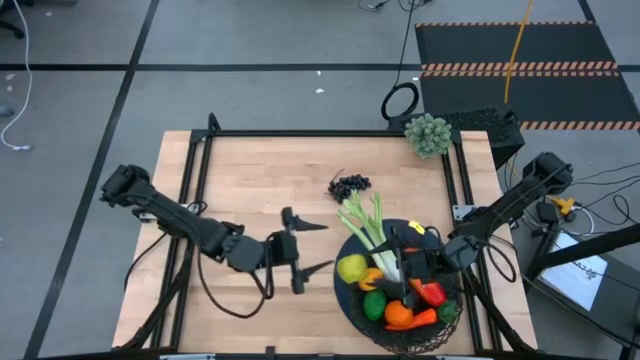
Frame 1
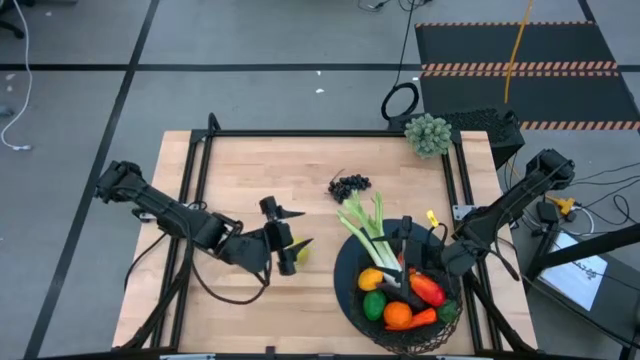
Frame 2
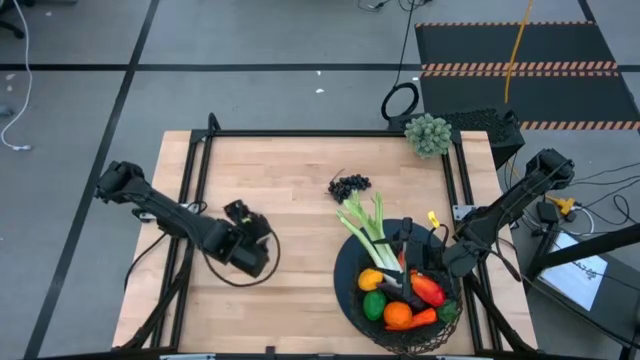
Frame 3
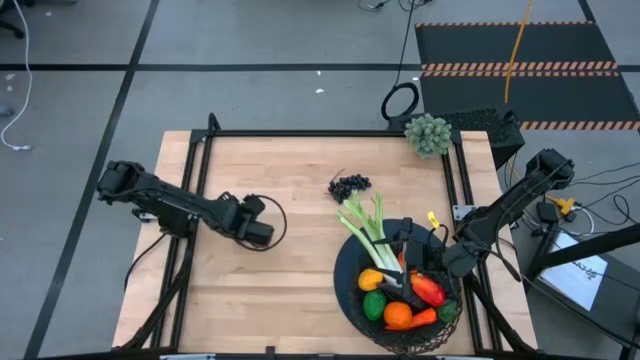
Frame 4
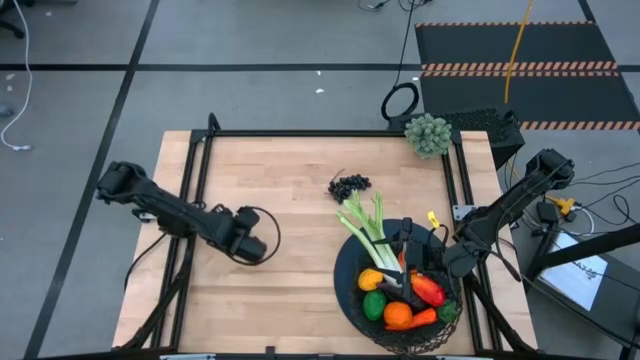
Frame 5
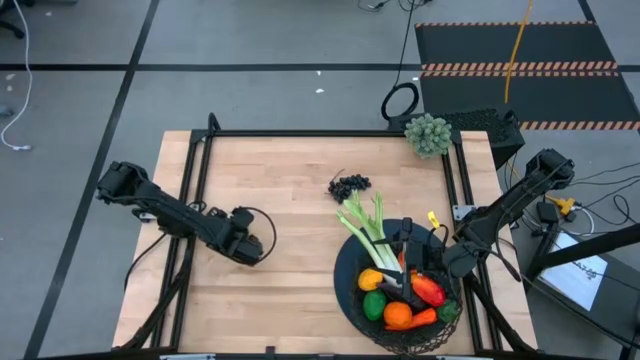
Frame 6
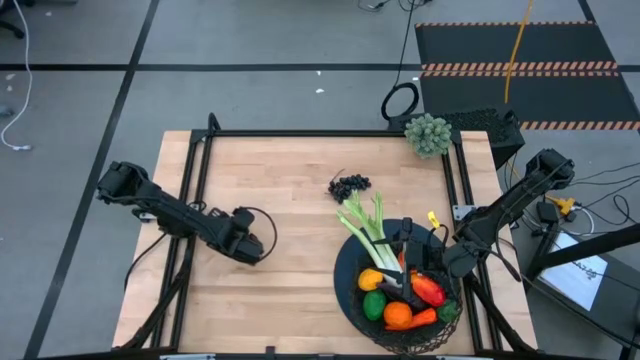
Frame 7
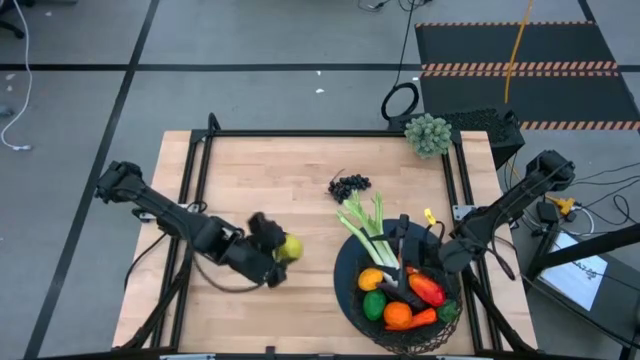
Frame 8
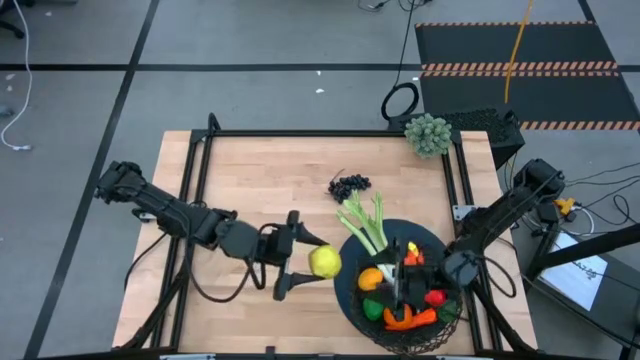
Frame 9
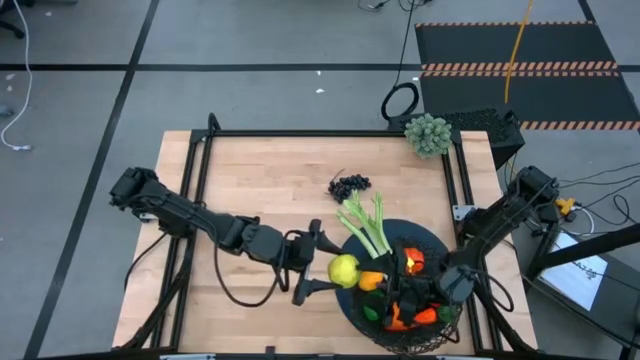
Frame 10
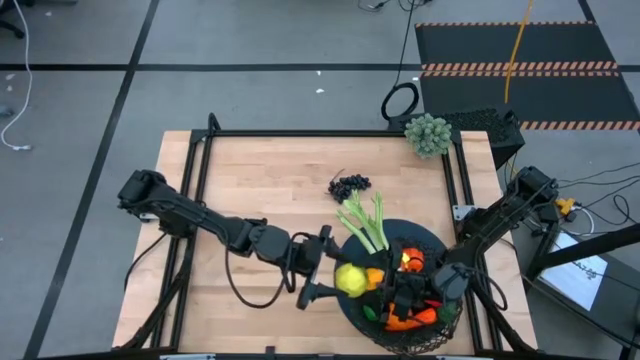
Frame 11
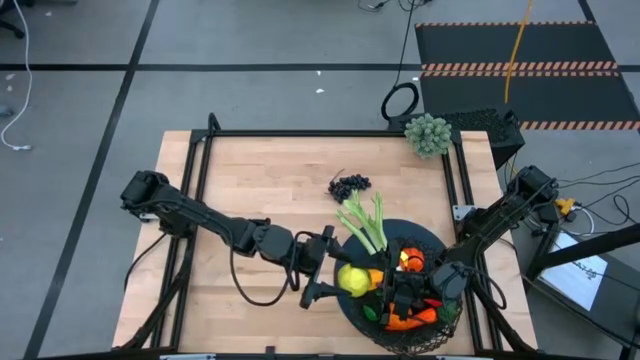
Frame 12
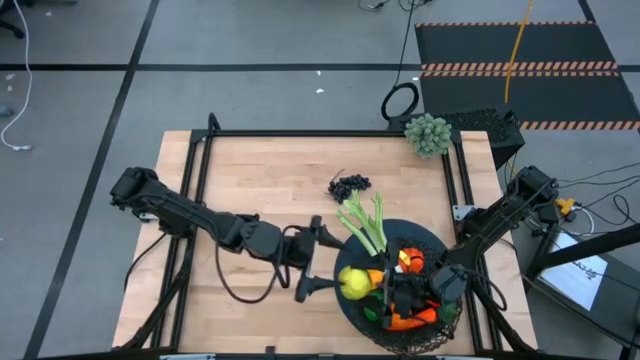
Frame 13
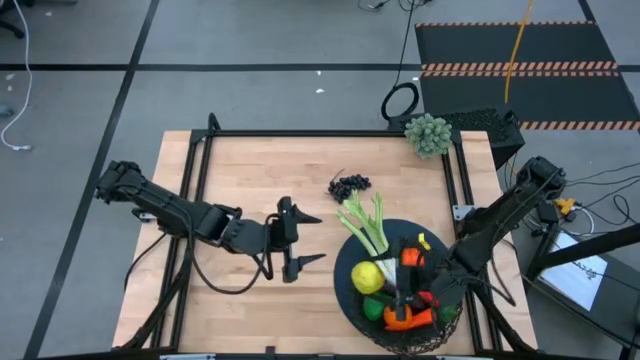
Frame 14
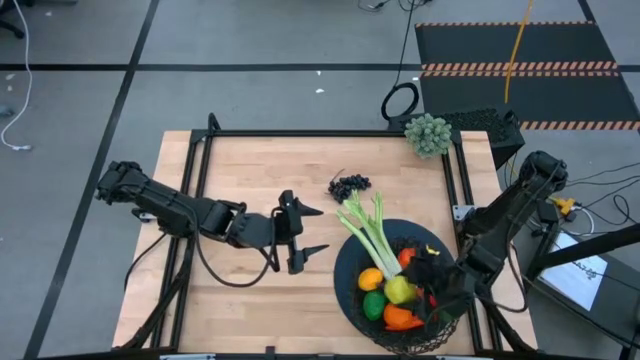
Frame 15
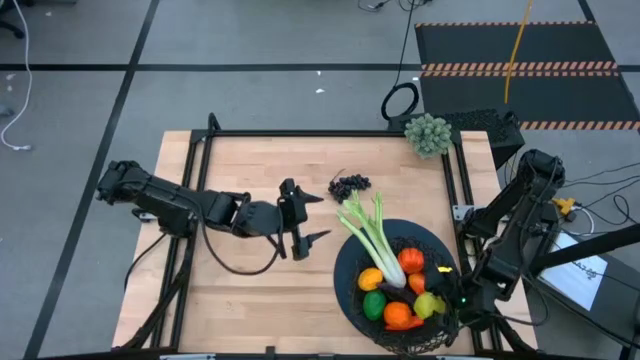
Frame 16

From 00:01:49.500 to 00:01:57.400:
Task: Build produce basket
Put the green apple into the wire basket

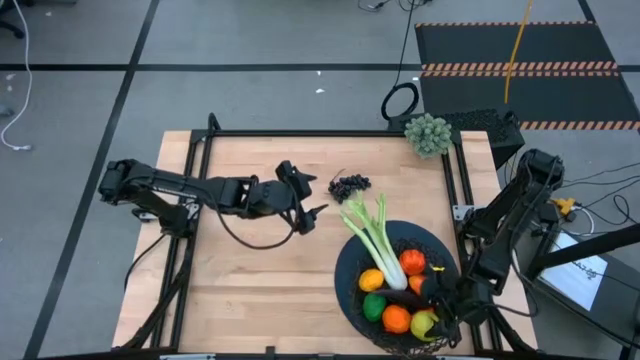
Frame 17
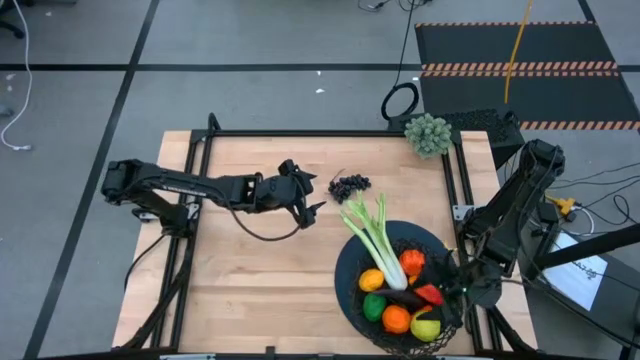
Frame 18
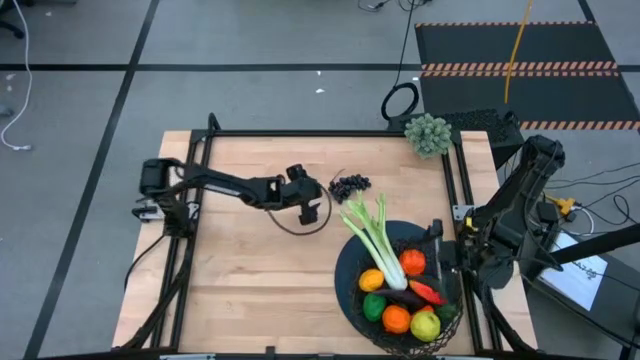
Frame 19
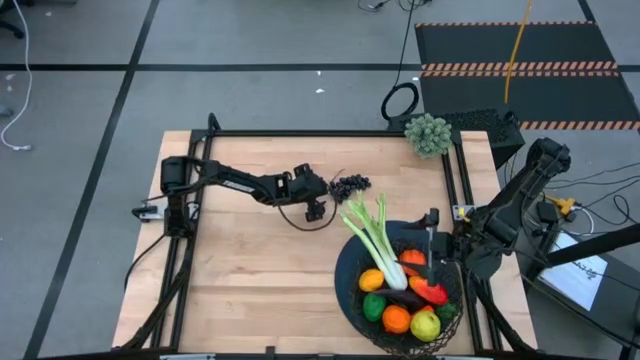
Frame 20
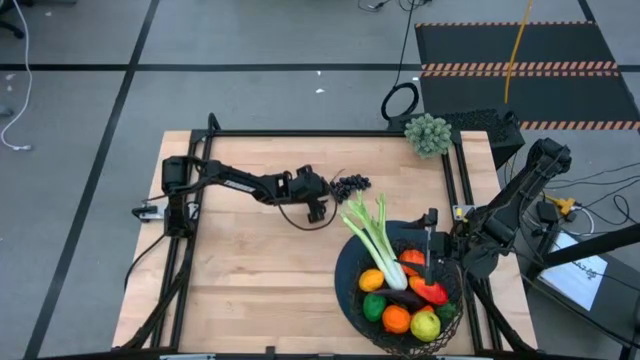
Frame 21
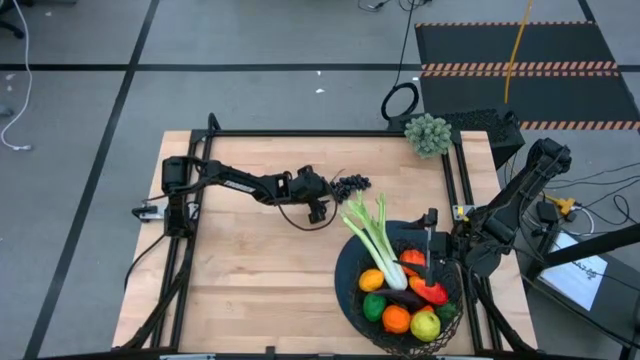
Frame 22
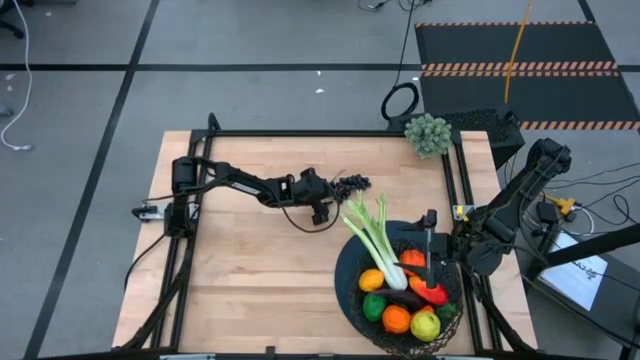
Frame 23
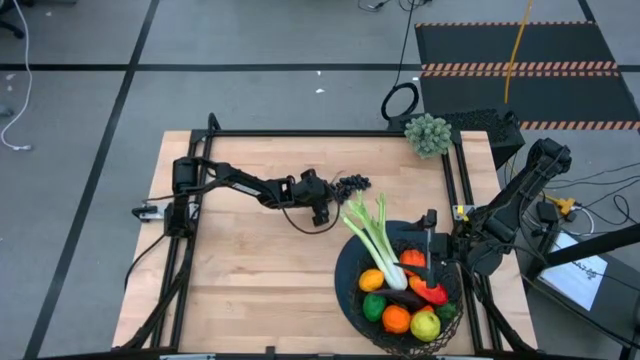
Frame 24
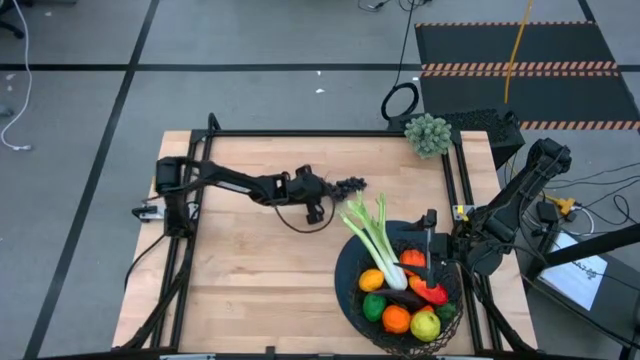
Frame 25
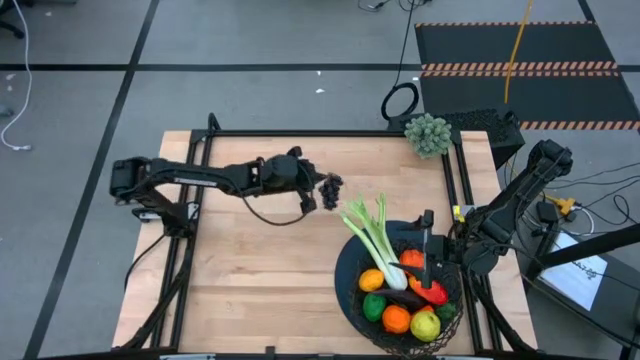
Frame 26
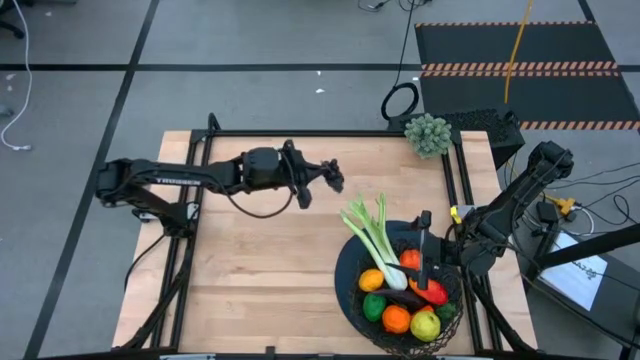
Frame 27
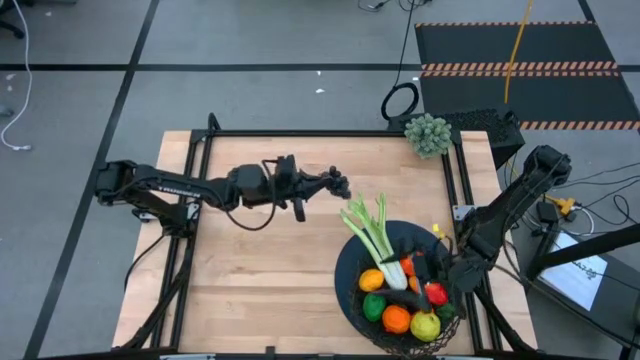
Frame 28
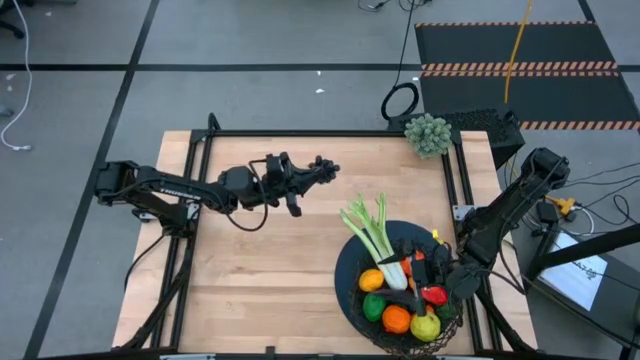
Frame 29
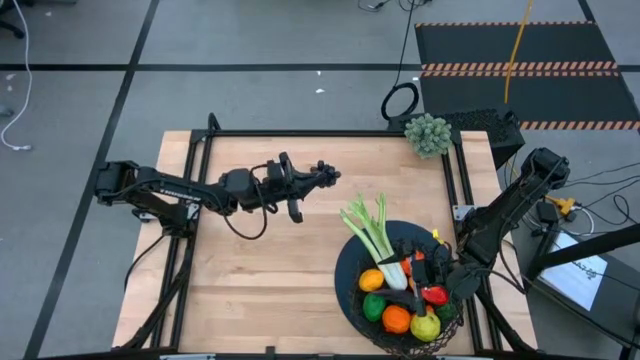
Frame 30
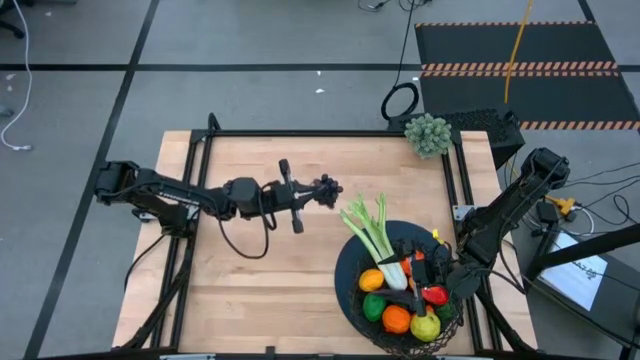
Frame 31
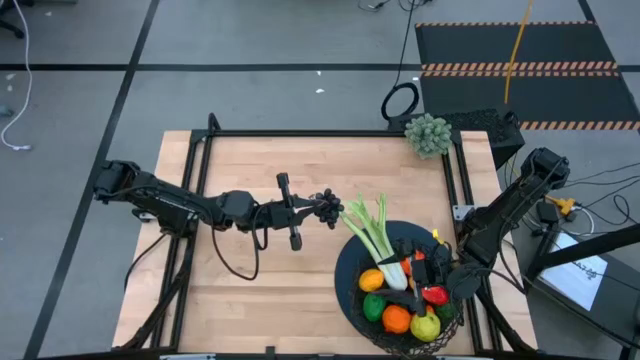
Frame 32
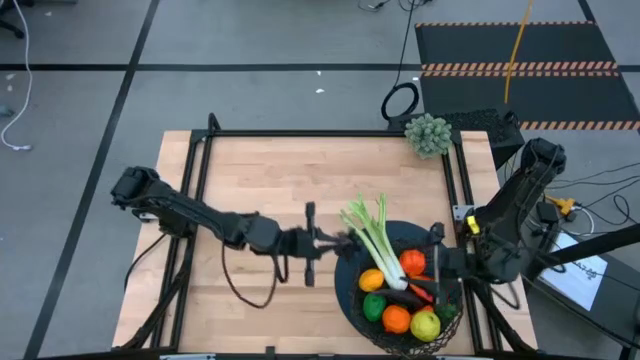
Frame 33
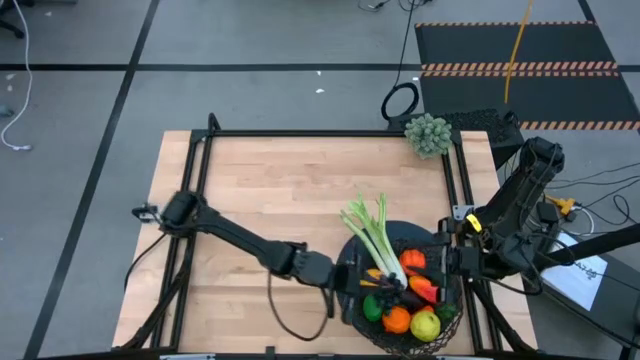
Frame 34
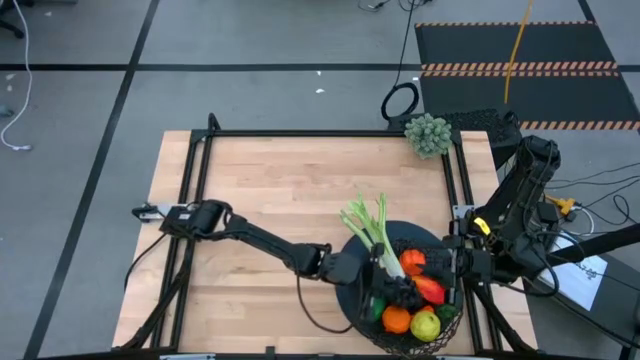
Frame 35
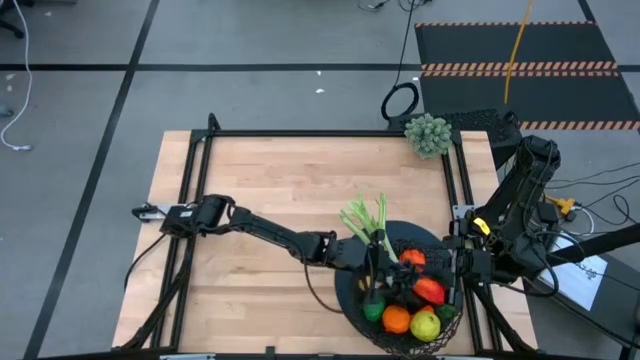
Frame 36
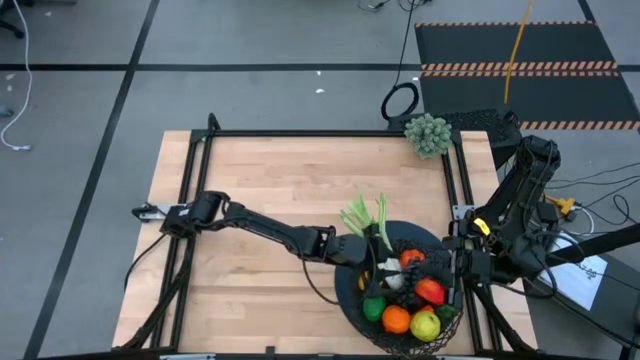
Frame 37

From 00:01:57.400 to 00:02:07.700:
Put the grapes into the wire basket

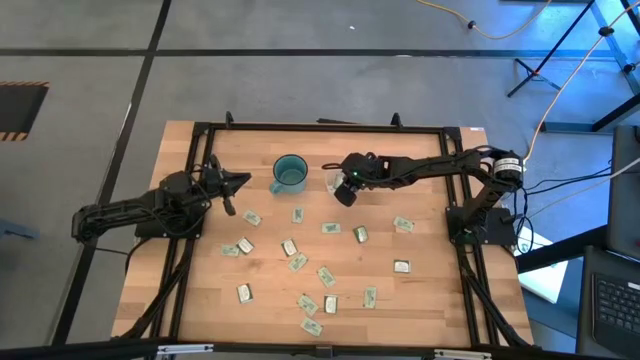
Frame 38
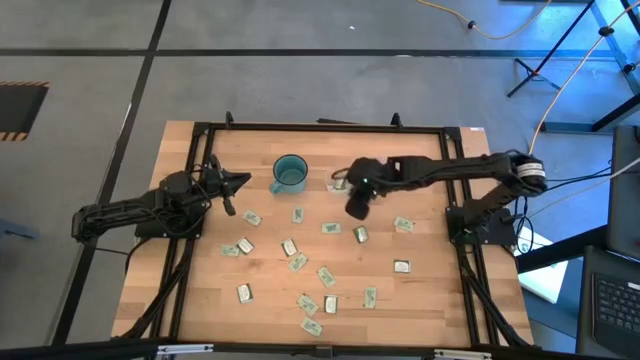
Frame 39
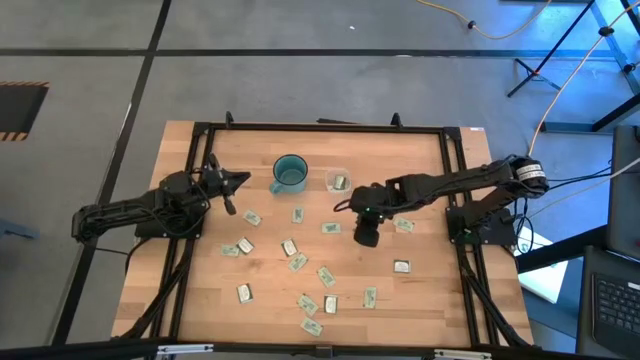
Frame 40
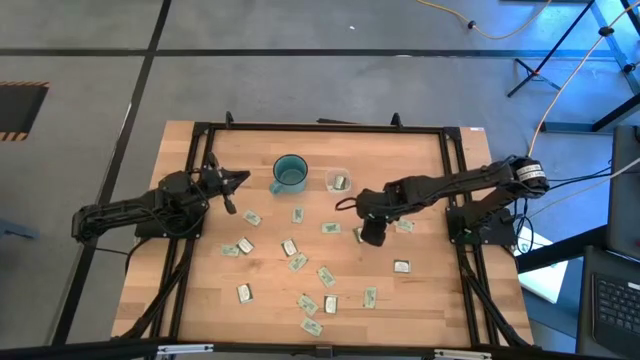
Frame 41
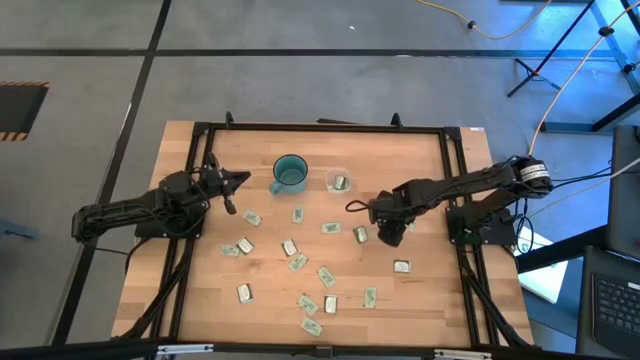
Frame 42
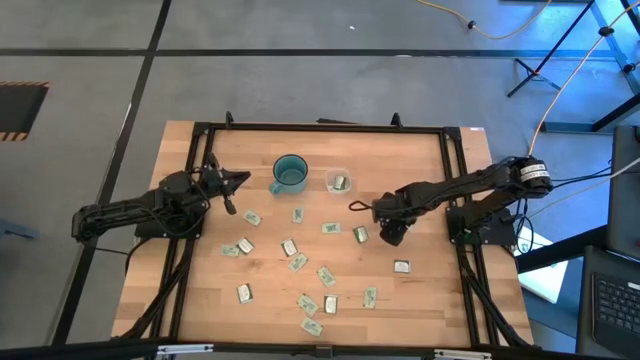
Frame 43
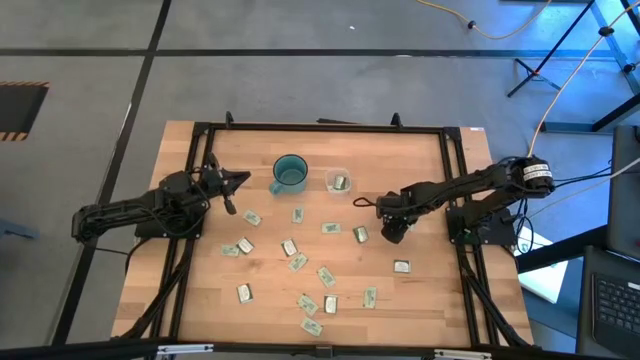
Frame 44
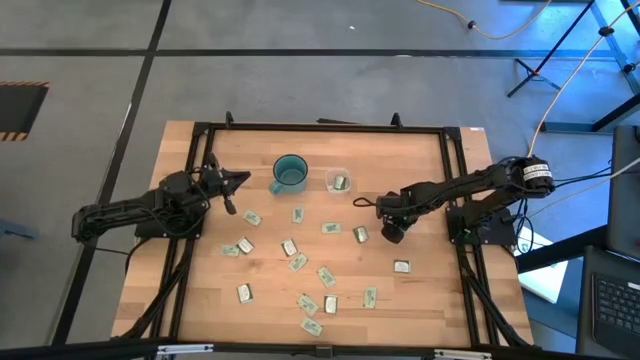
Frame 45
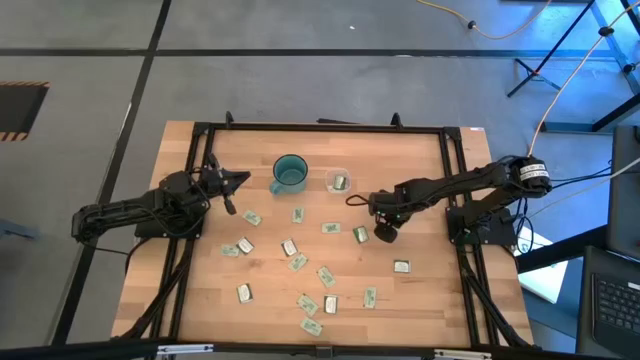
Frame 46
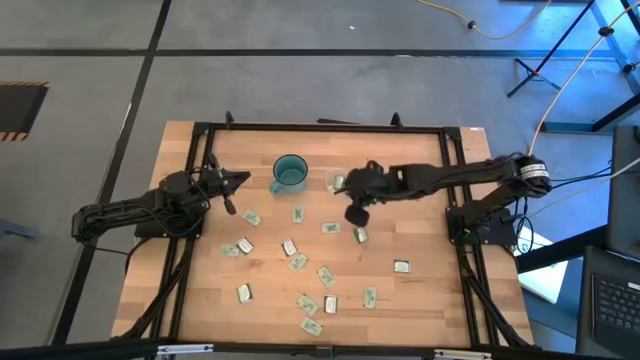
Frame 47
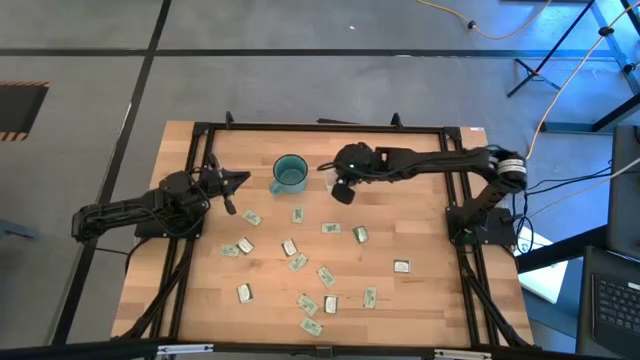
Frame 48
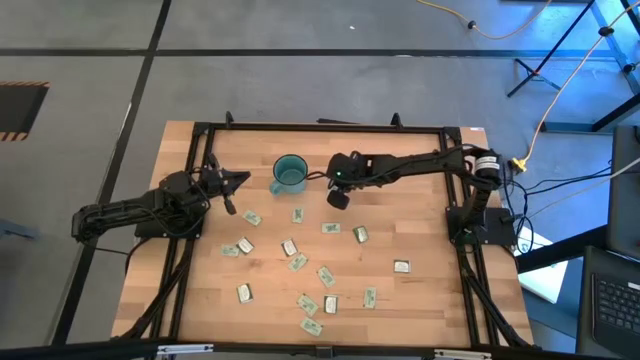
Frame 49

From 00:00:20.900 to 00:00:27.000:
Task: Pick and place items into bin
Put the white stevia packet into the transparent bin
